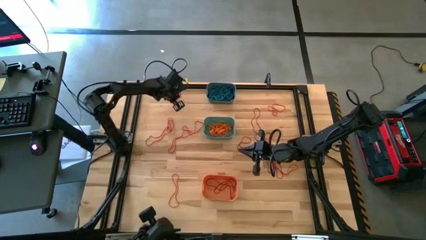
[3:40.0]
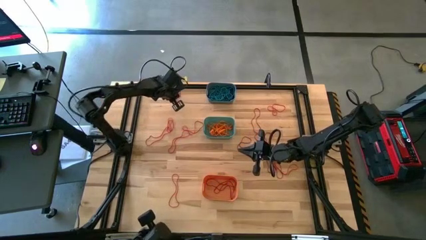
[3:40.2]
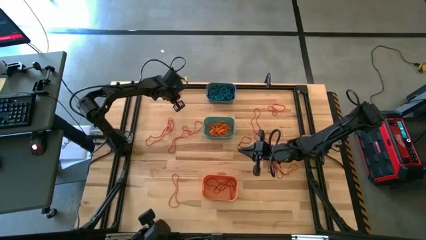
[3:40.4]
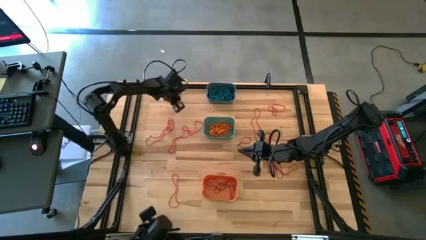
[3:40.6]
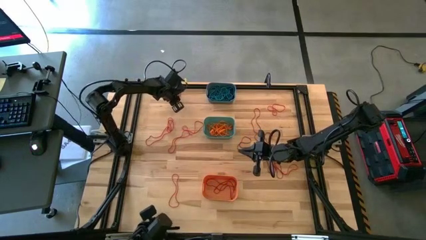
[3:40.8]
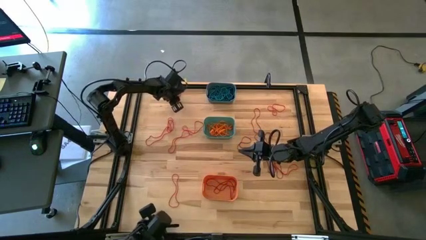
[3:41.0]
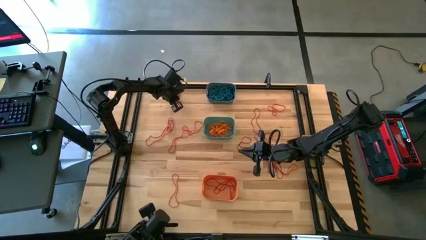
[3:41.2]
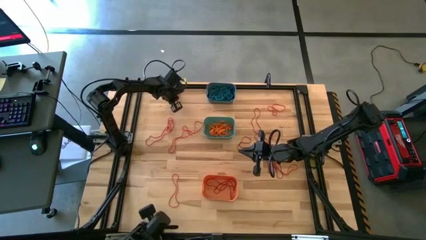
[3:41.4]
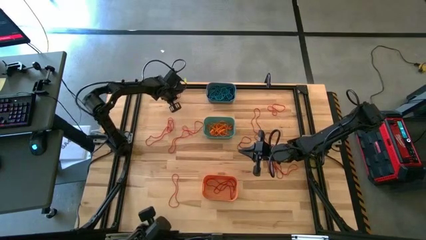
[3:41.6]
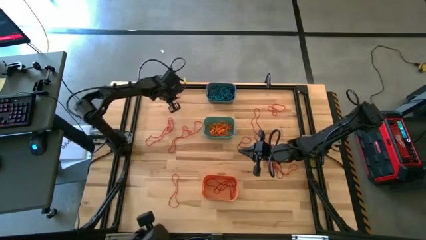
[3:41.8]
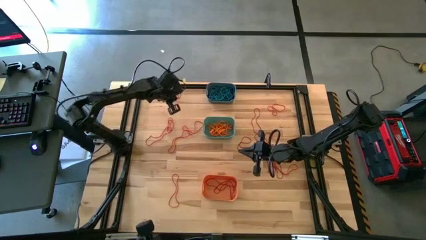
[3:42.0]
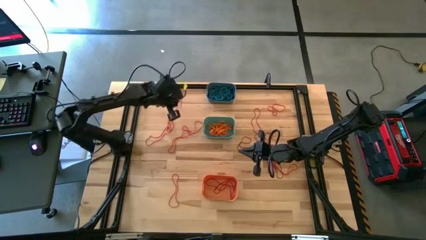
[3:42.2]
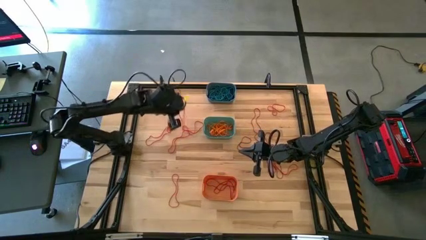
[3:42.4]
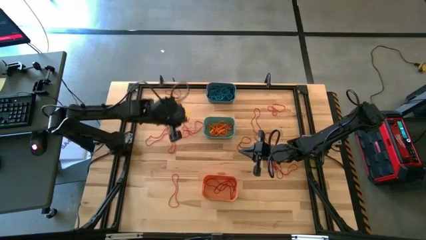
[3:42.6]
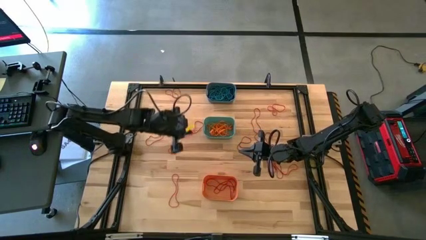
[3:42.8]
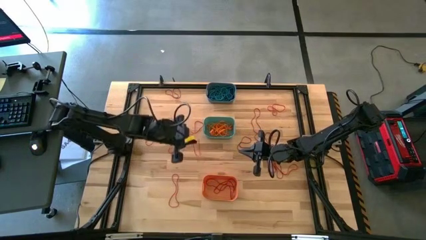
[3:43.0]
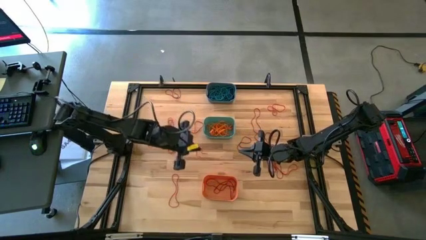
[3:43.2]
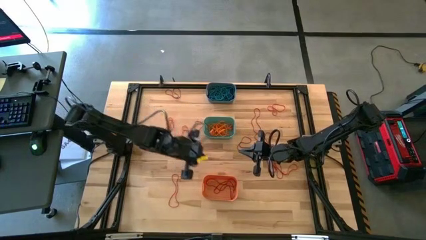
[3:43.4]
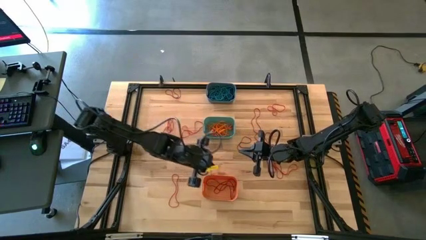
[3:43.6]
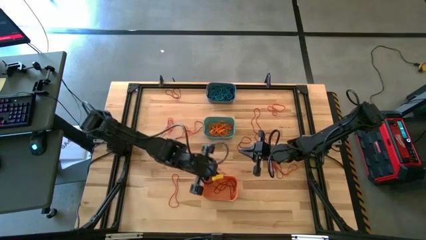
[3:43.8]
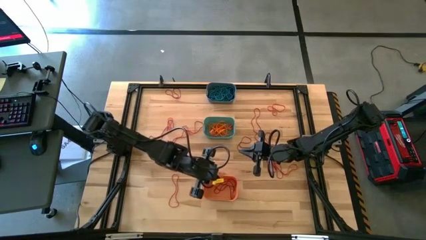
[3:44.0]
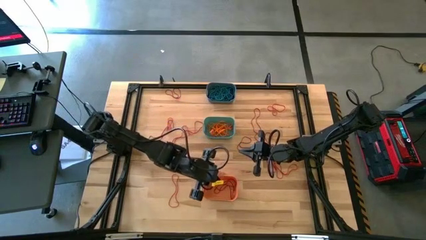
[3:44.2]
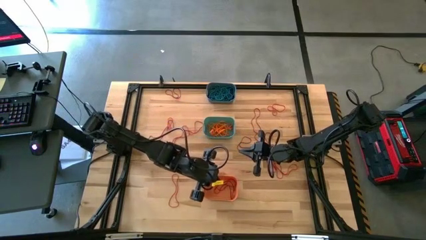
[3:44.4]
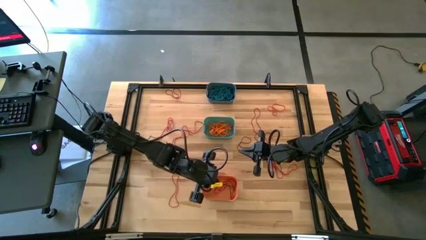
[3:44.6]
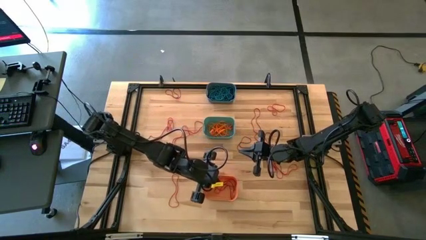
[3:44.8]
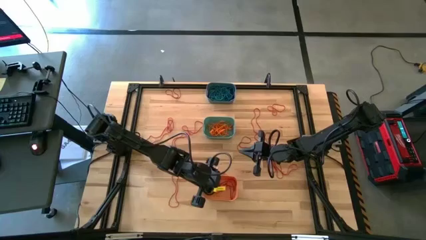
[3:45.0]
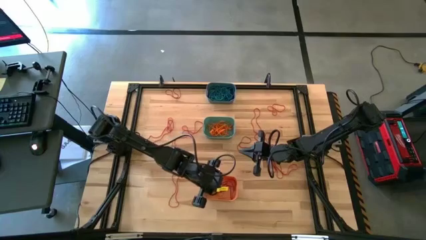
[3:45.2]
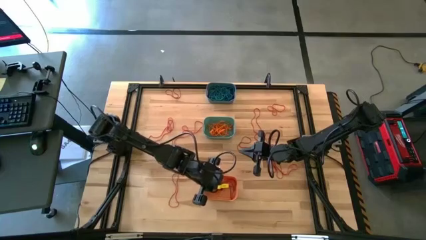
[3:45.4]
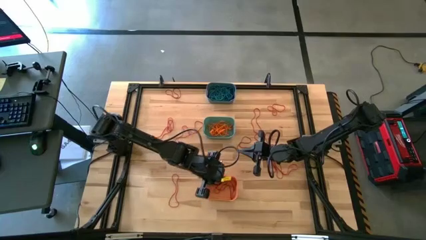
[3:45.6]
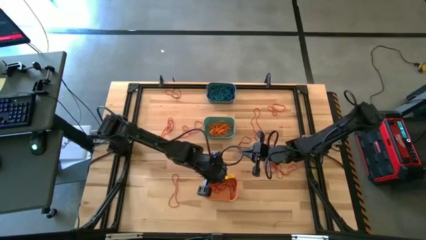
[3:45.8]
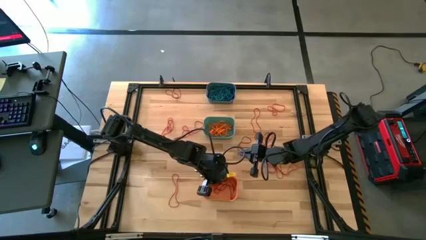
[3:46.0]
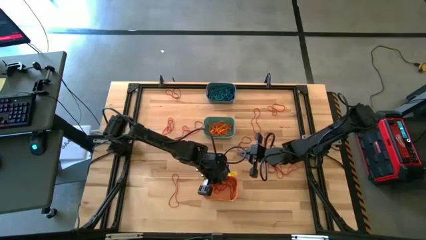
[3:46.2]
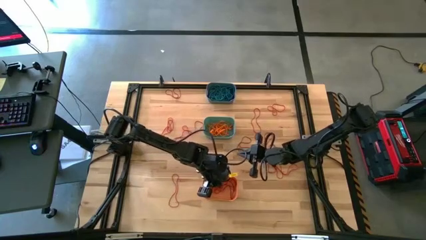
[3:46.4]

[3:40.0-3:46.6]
Task: Sort rubber bands into baskets
Put the red rubber band into the orange bin

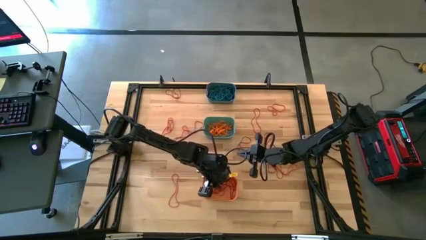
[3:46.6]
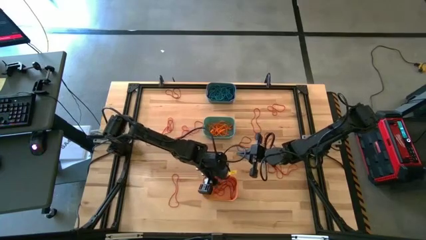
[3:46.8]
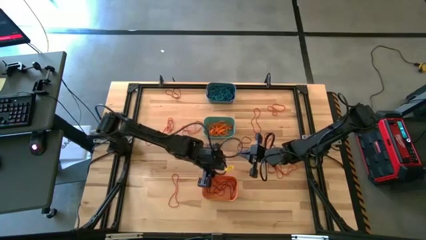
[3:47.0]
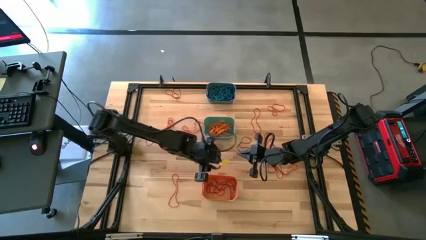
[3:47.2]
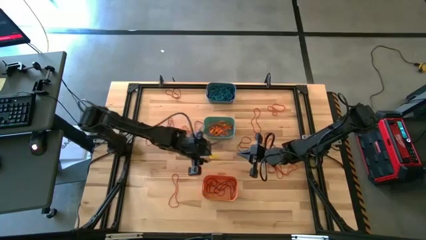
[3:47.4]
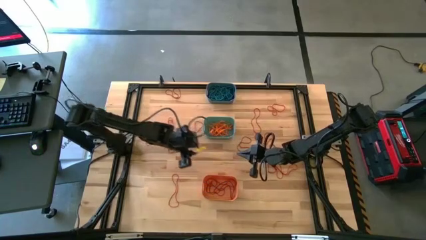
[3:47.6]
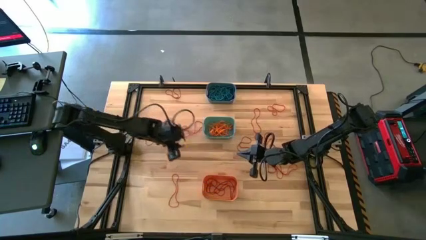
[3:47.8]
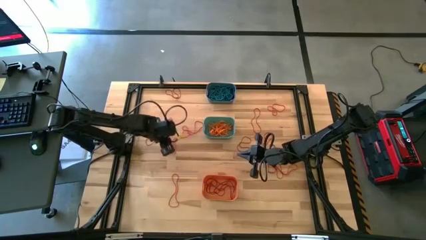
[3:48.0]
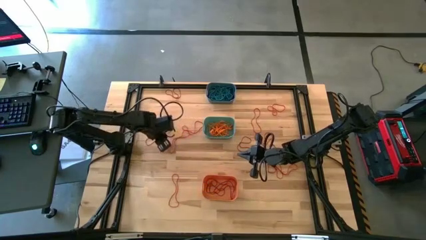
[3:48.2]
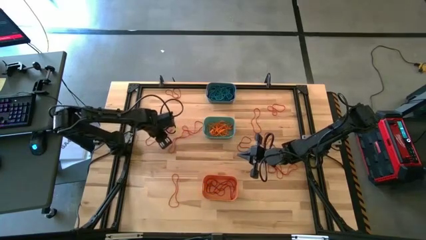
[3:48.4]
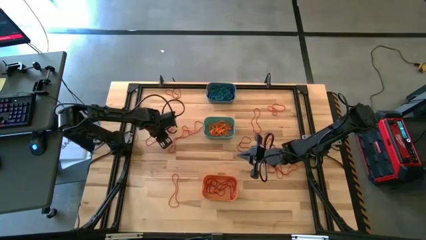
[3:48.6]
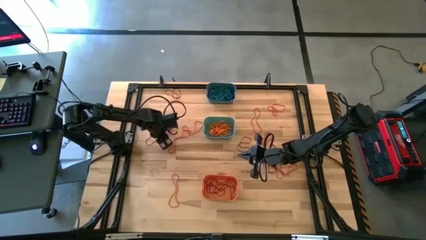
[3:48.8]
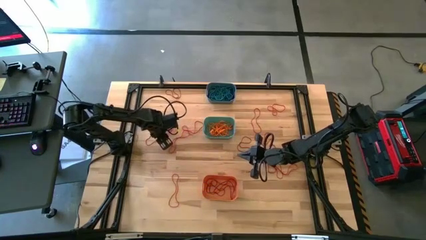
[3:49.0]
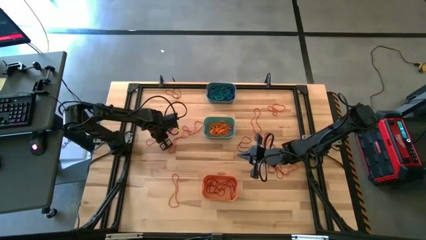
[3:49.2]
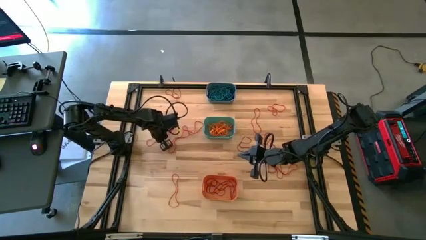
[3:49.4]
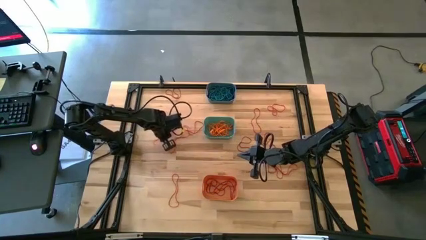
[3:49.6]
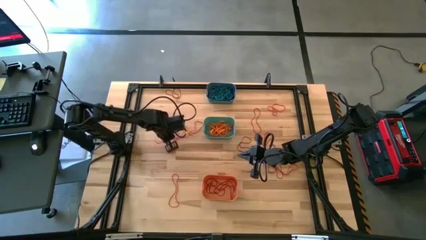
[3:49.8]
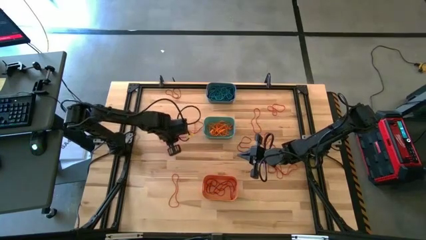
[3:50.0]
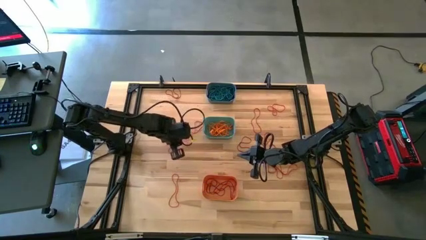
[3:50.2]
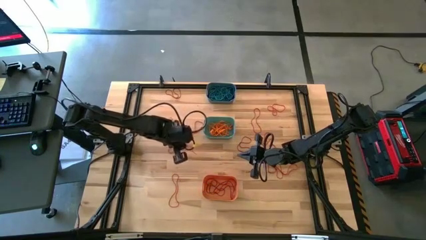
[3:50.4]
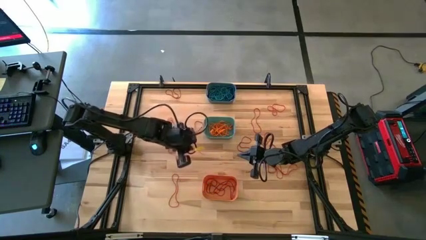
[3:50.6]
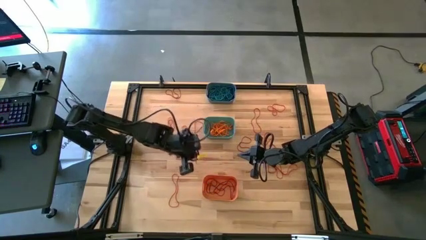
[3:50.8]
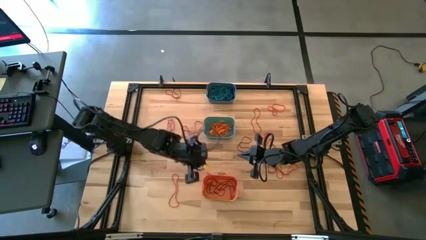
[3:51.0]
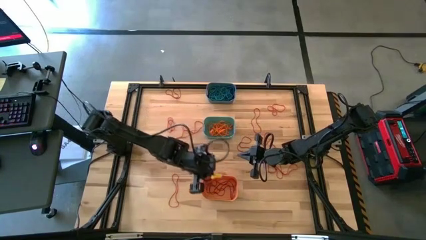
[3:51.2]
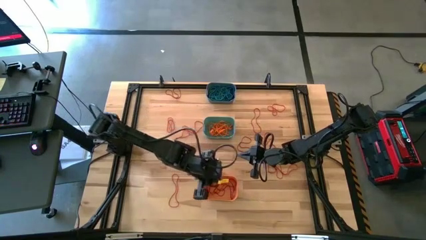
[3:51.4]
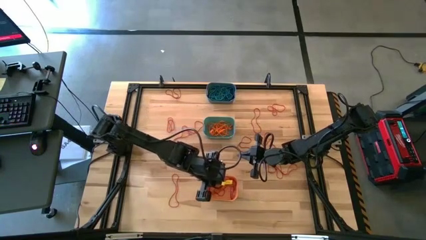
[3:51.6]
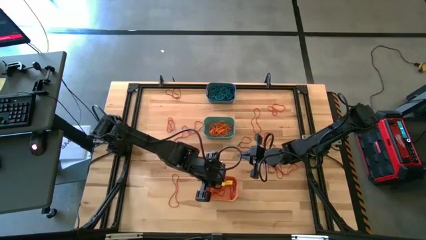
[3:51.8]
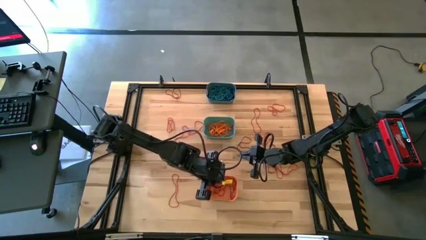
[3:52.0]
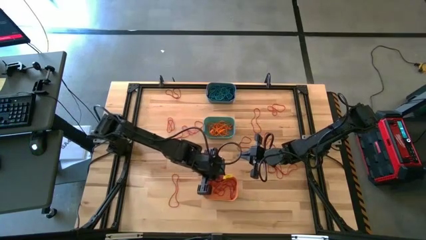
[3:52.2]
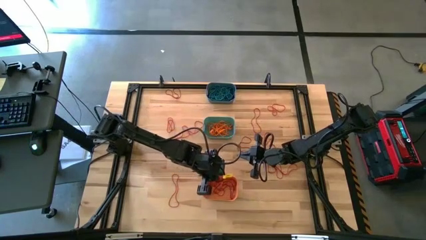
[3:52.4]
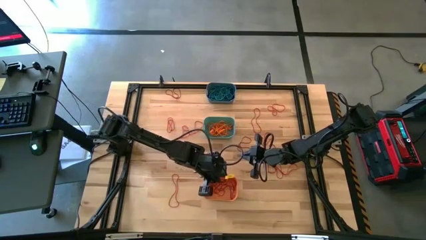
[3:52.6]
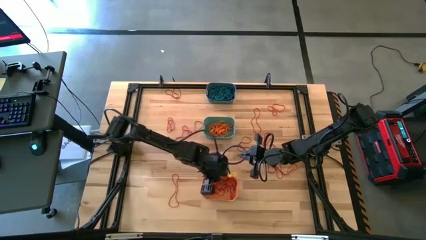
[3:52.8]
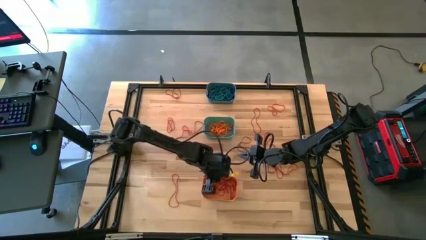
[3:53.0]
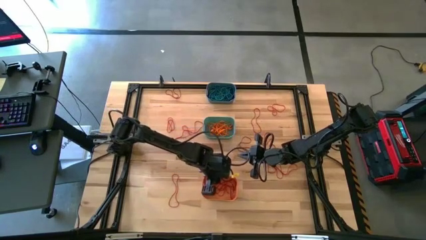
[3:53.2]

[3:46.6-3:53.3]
Put the red rubber band into the orange bin

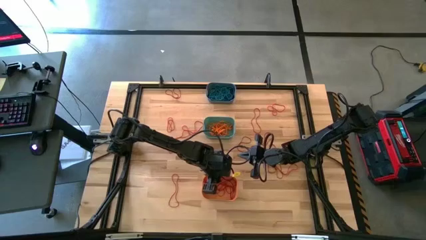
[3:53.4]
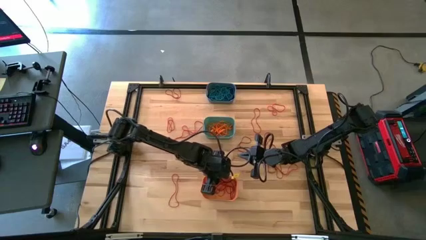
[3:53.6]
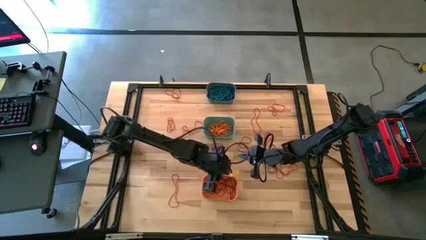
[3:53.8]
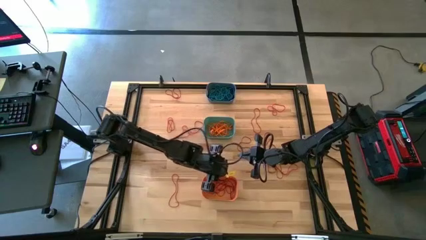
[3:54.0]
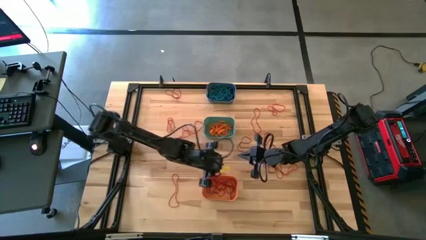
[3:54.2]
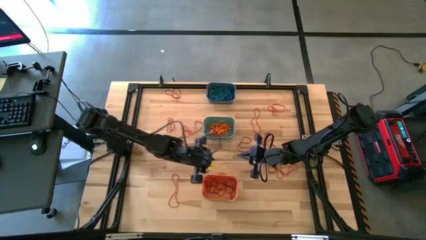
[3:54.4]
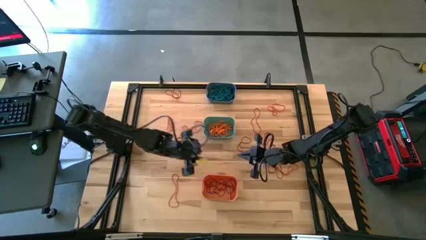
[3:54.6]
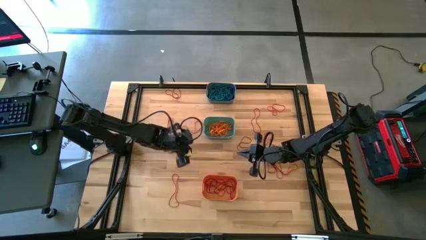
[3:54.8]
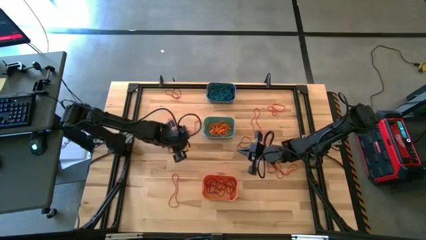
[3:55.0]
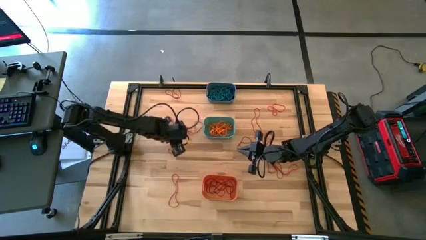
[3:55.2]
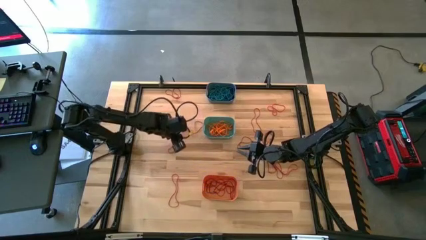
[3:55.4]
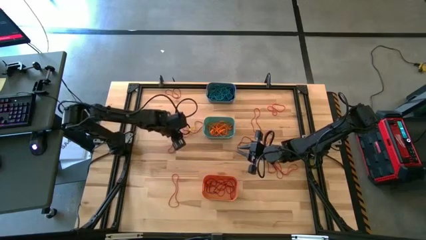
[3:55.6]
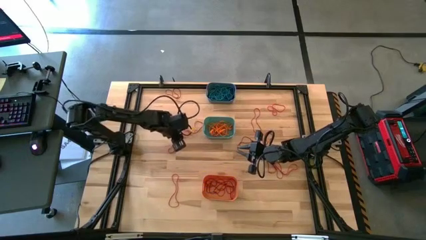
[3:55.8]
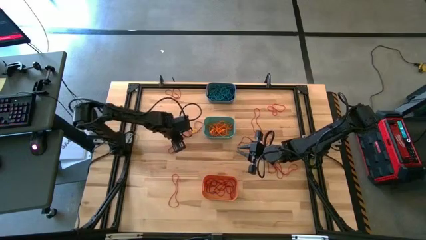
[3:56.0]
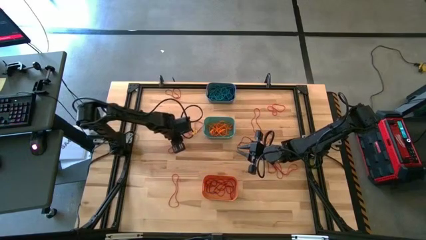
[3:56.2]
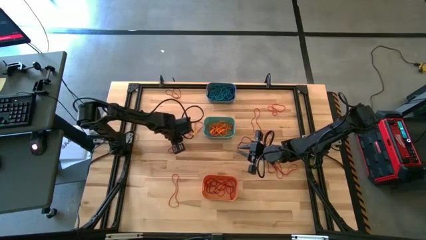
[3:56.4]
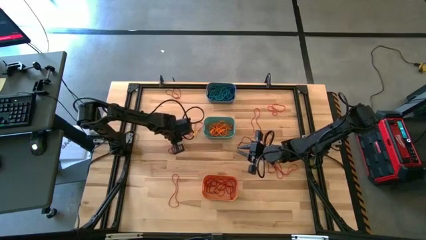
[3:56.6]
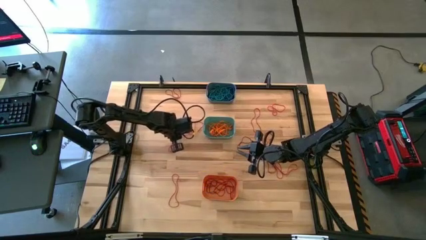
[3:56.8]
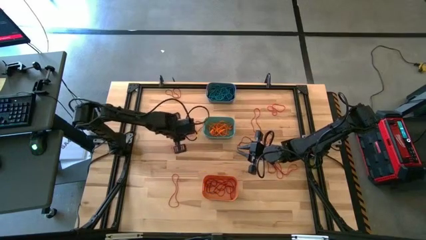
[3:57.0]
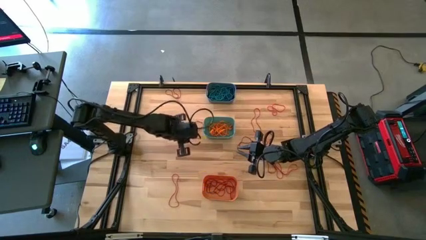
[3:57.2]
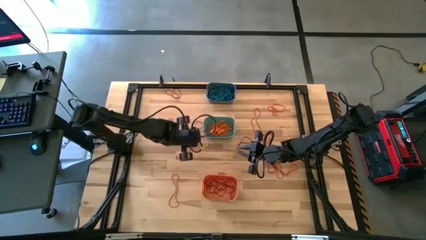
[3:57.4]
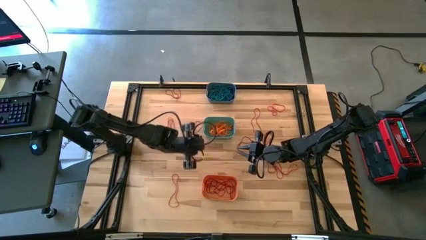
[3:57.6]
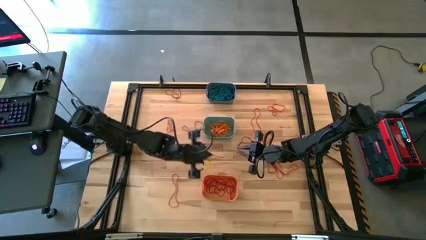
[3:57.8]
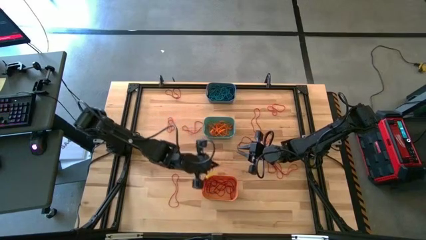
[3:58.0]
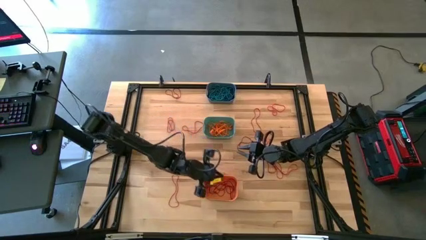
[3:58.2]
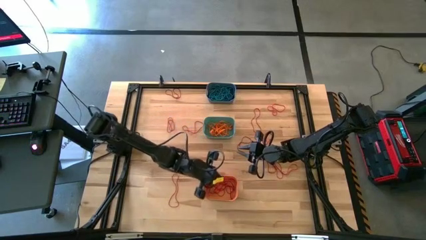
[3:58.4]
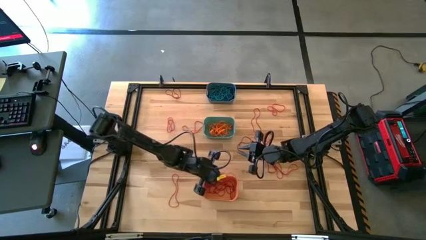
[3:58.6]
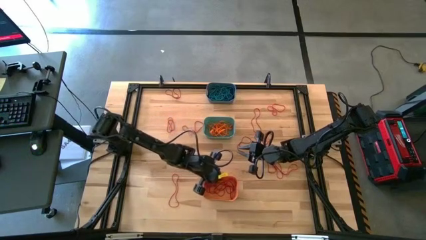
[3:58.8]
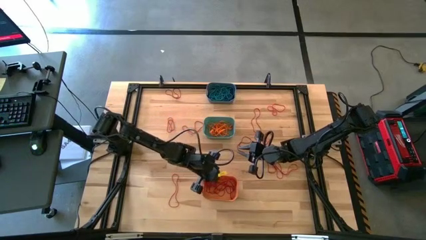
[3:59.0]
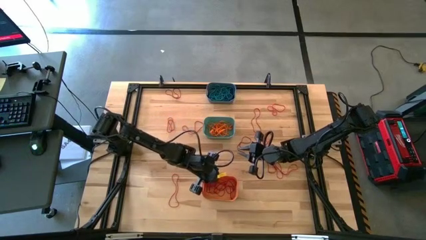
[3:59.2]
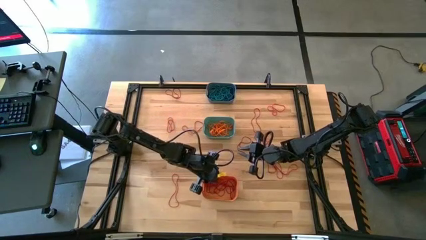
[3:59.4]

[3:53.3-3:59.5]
Put the red rubber band into the orange bin
